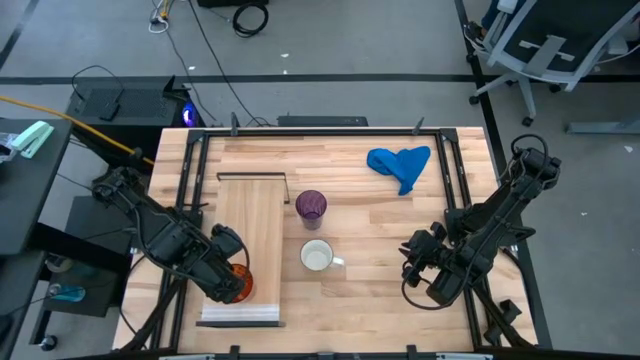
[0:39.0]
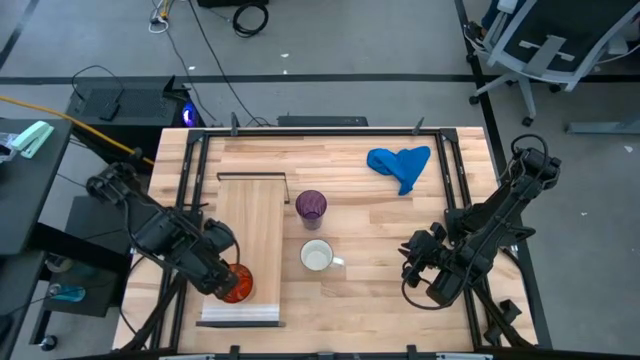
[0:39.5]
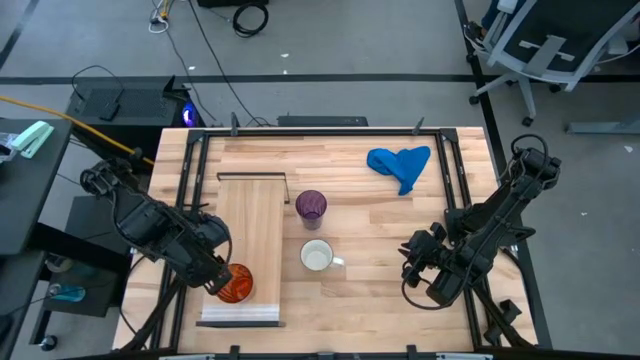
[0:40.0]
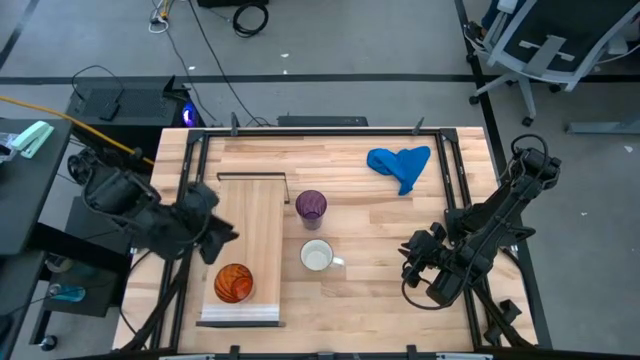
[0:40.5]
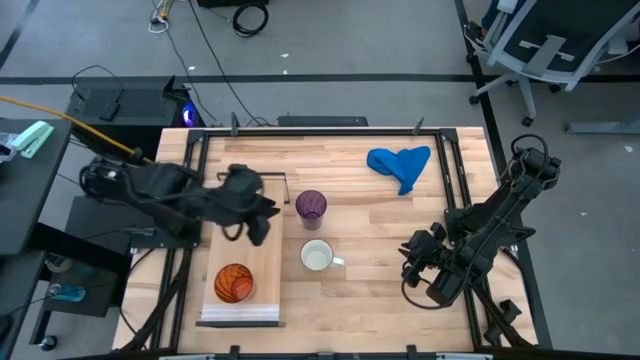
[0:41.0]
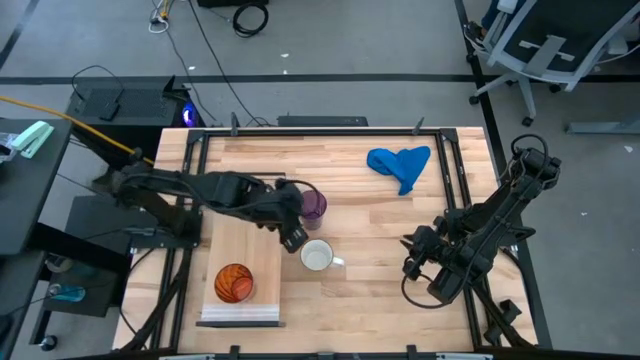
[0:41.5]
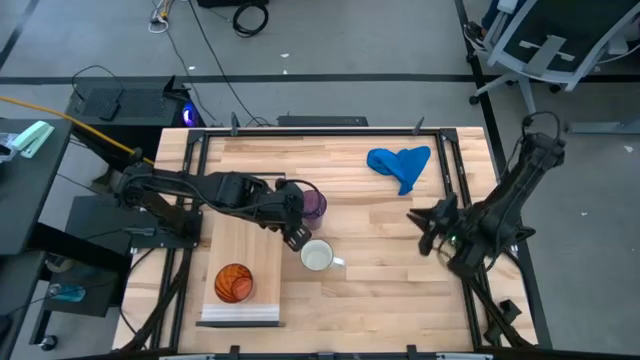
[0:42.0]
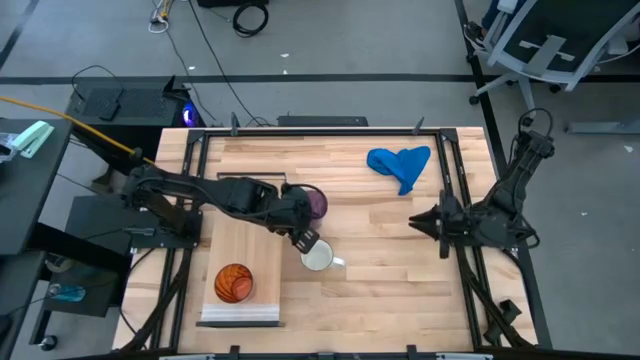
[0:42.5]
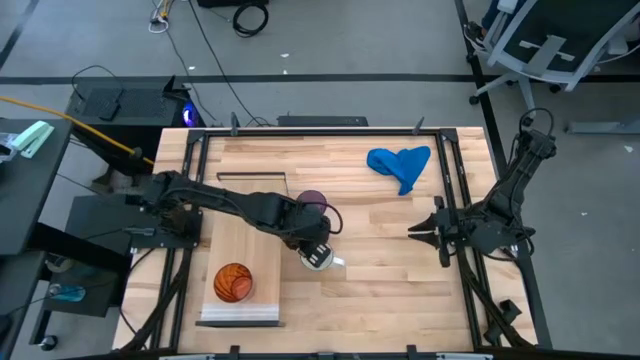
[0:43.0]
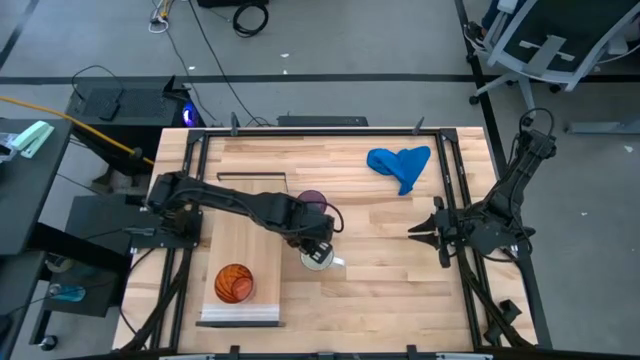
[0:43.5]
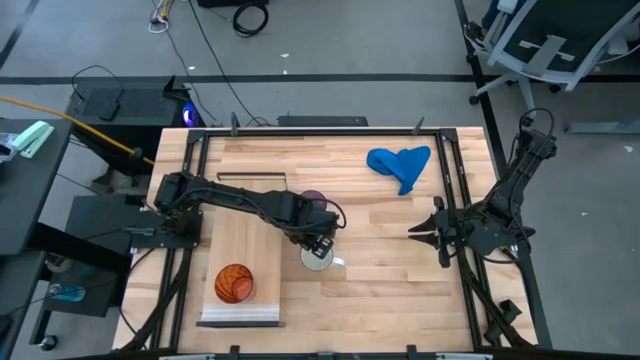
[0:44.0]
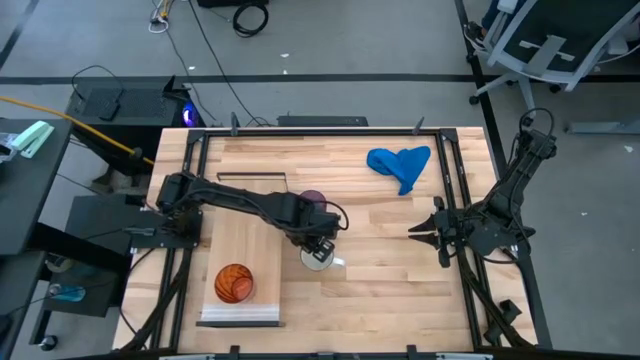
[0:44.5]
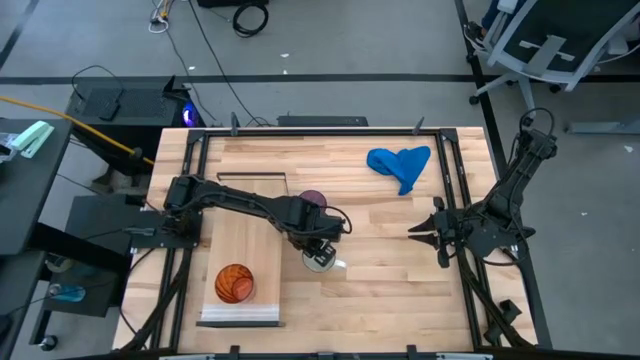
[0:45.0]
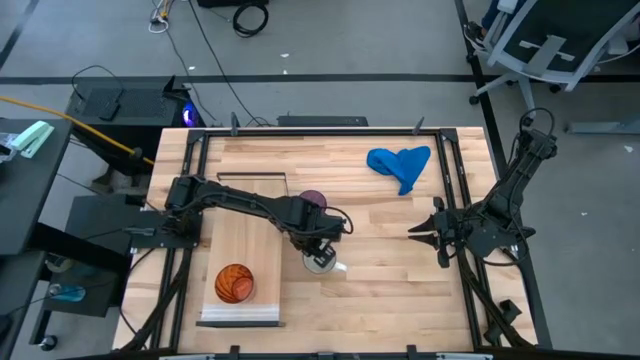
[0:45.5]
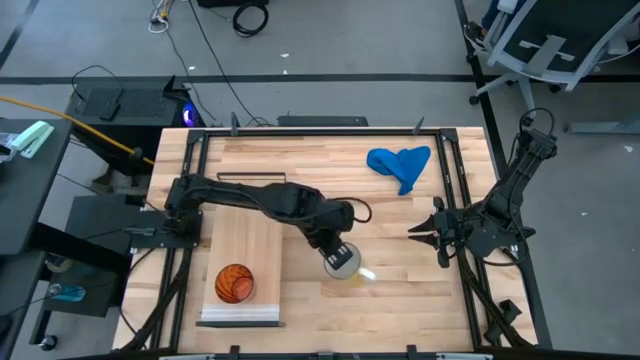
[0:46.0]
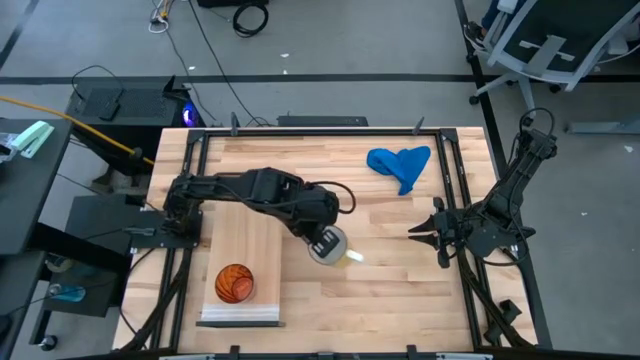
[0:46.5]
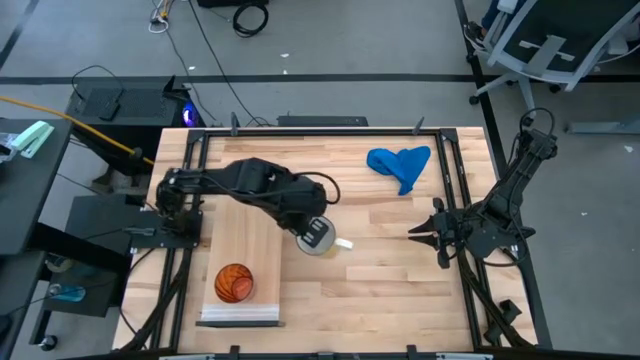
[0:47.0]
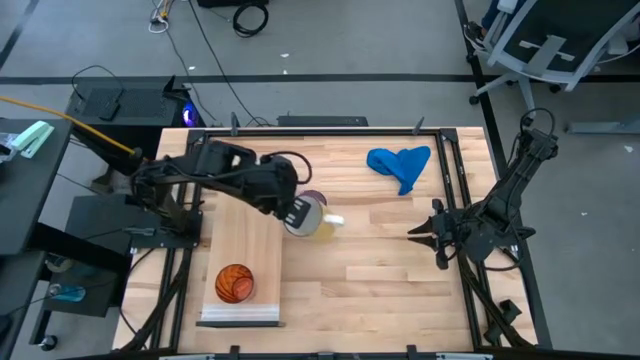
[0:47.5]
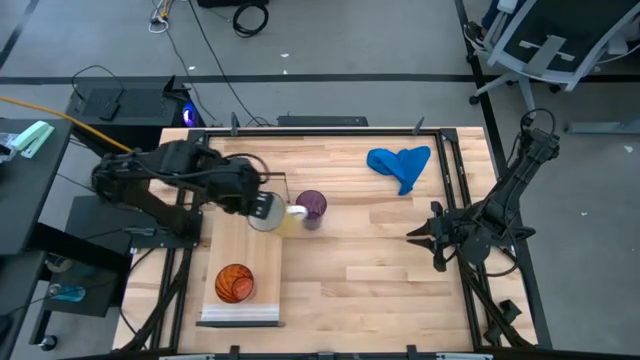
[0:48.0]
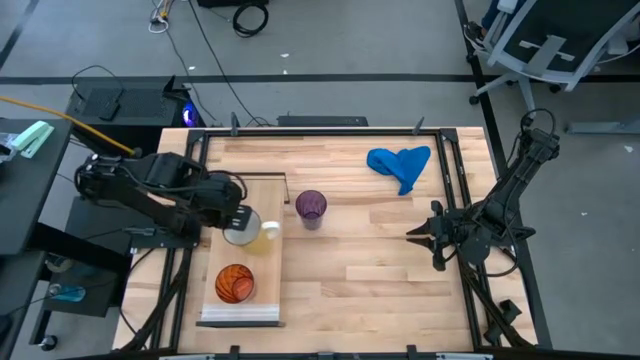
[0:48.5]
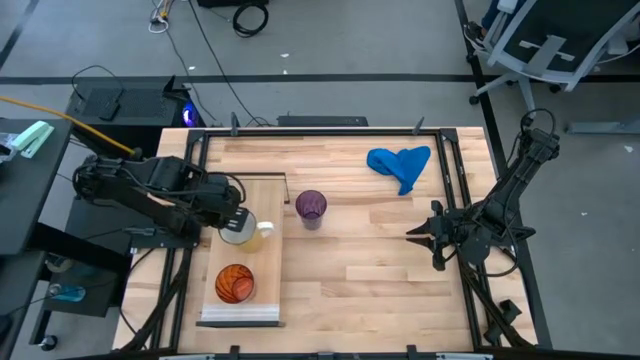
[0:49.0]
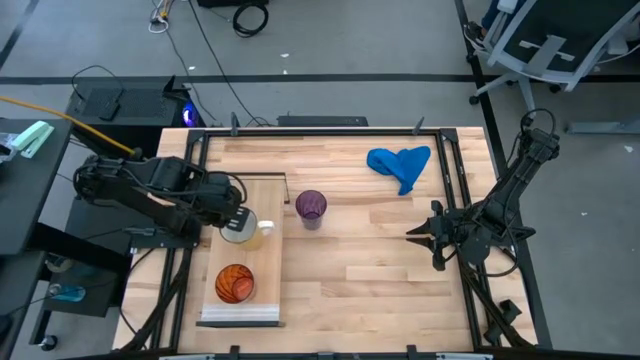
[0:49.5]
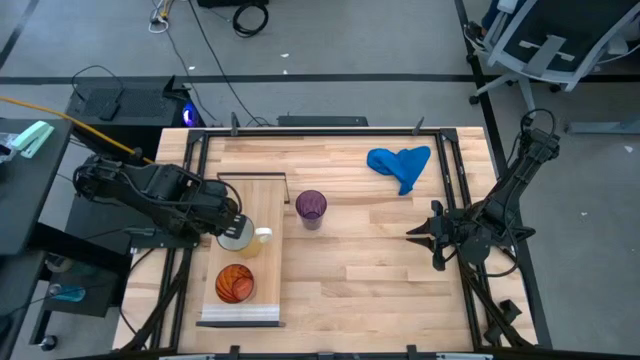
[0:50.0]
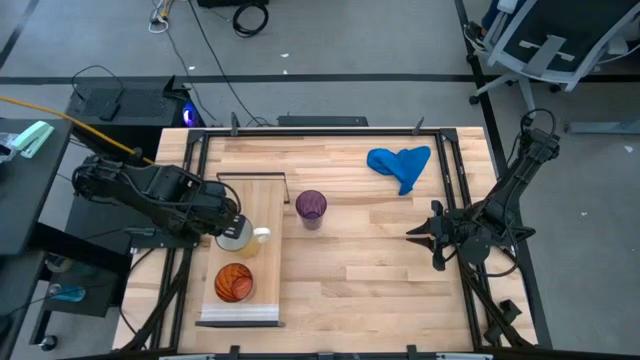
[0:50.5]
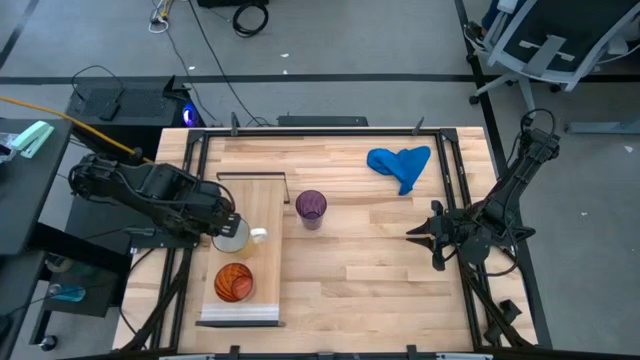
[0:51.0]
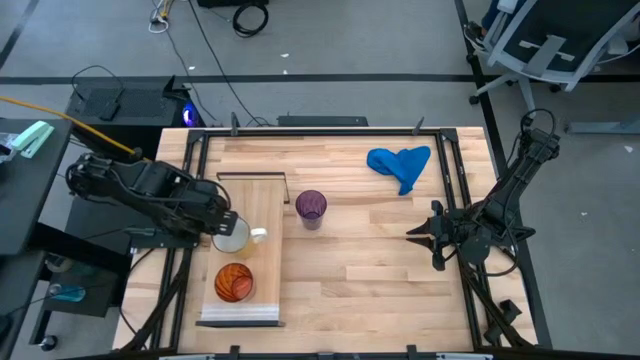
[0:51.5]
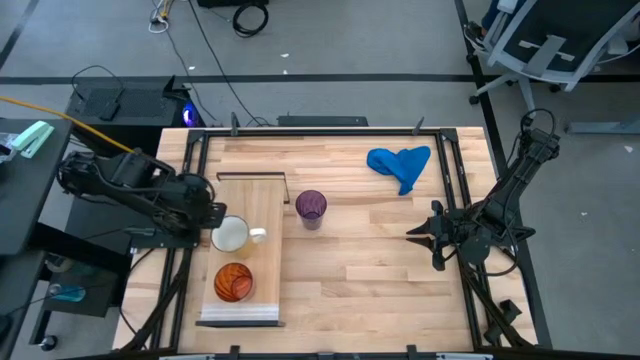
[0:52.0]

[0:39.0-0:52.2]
Task: Stack small to large cups/mugs on shelf
Put the yellow mug on the shelf

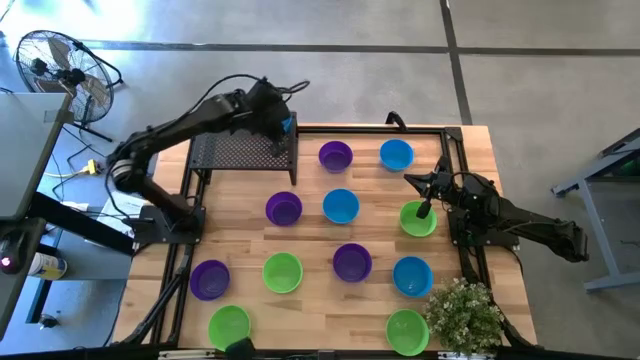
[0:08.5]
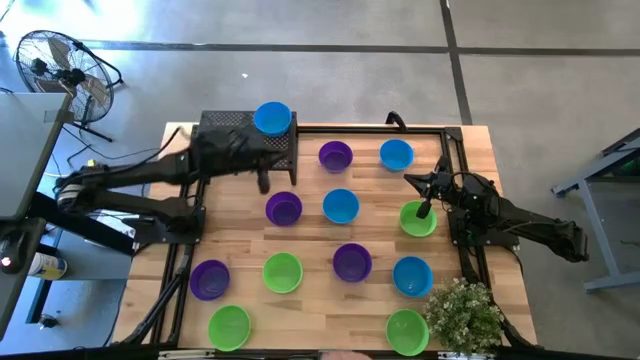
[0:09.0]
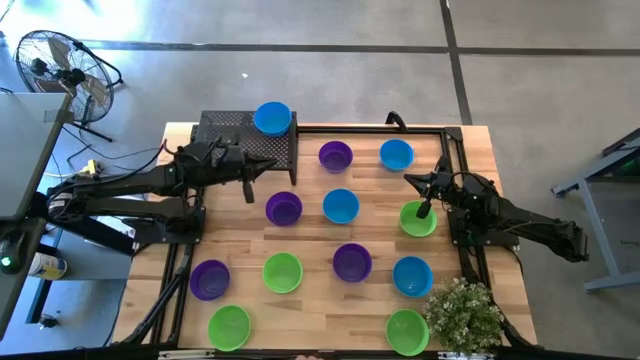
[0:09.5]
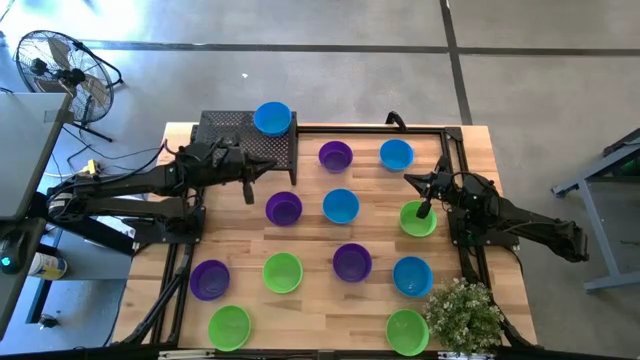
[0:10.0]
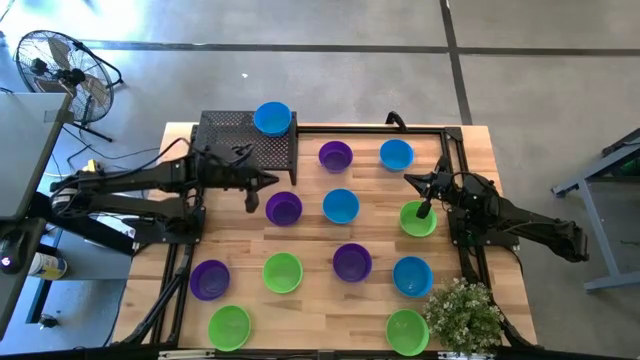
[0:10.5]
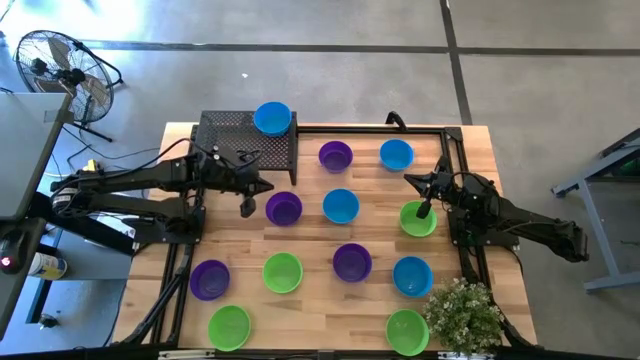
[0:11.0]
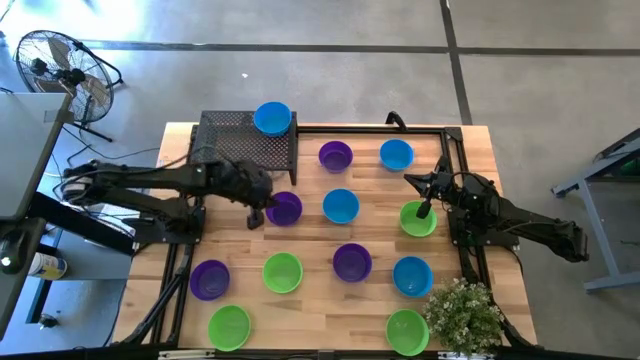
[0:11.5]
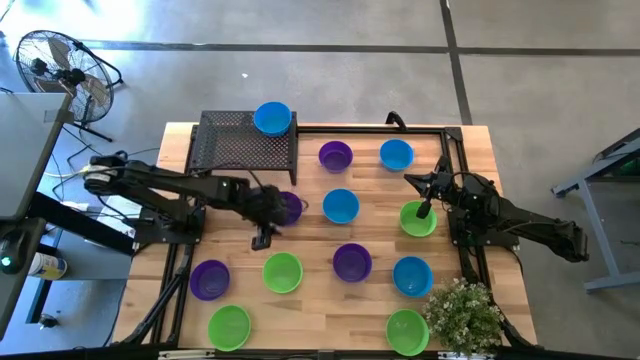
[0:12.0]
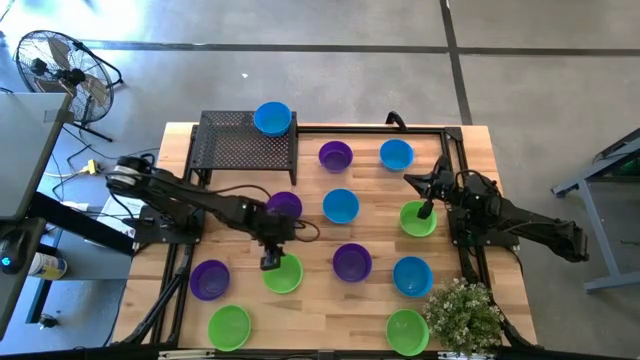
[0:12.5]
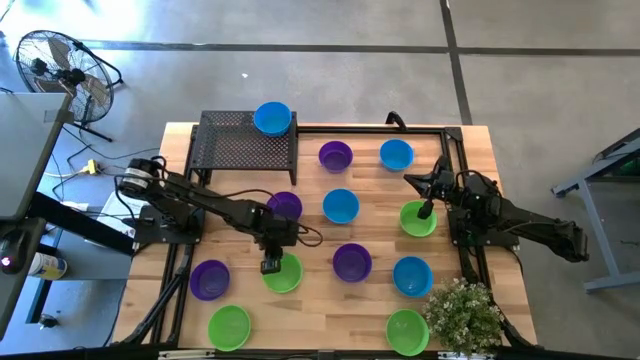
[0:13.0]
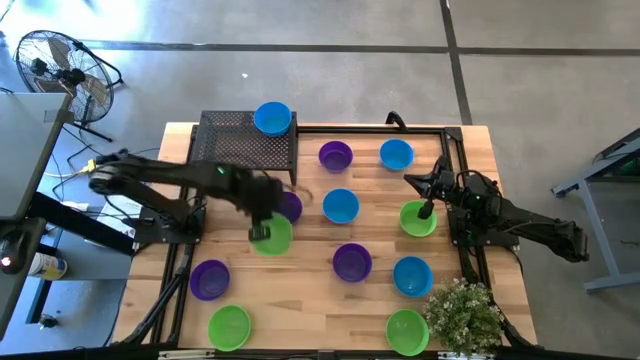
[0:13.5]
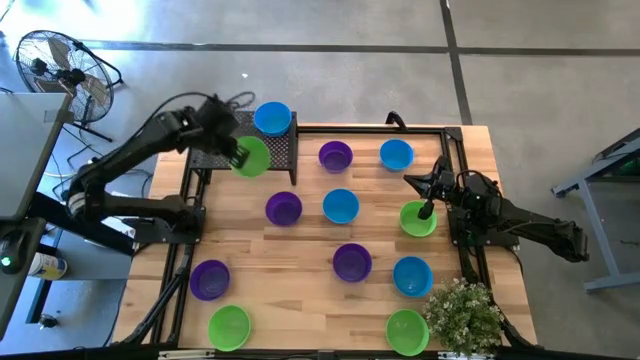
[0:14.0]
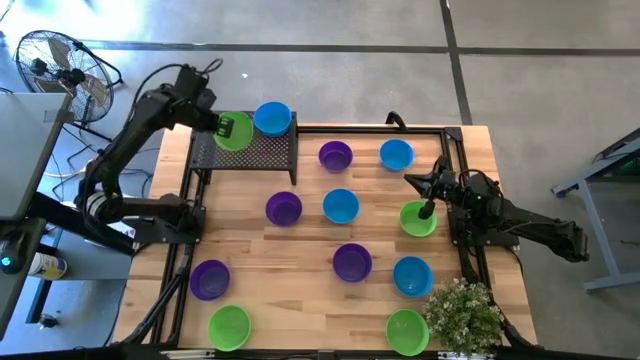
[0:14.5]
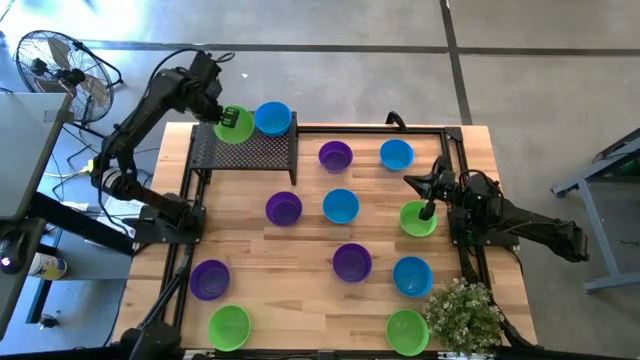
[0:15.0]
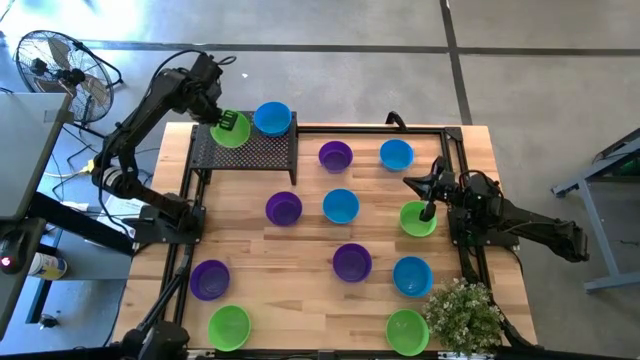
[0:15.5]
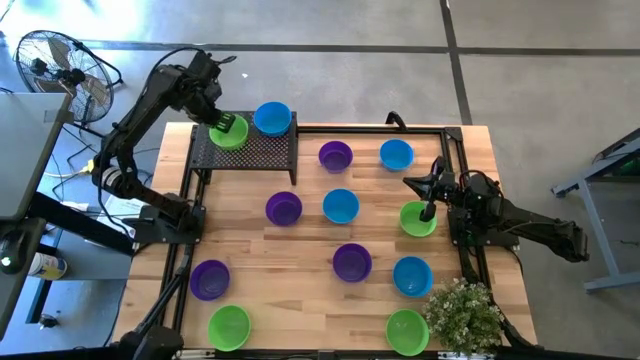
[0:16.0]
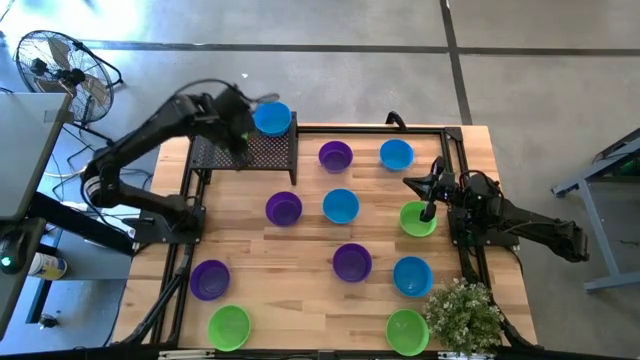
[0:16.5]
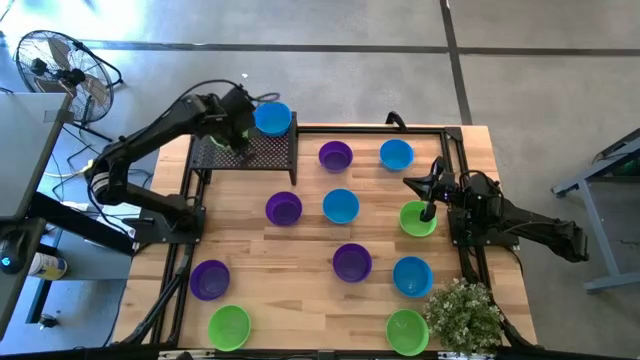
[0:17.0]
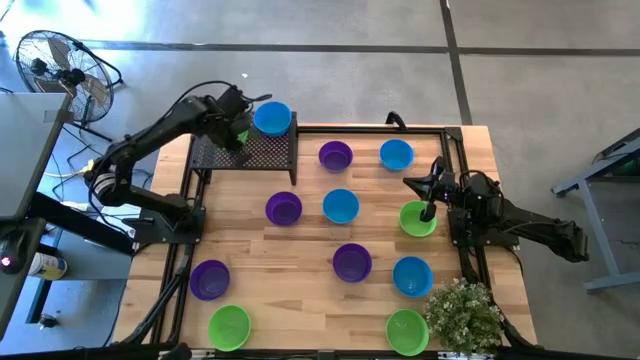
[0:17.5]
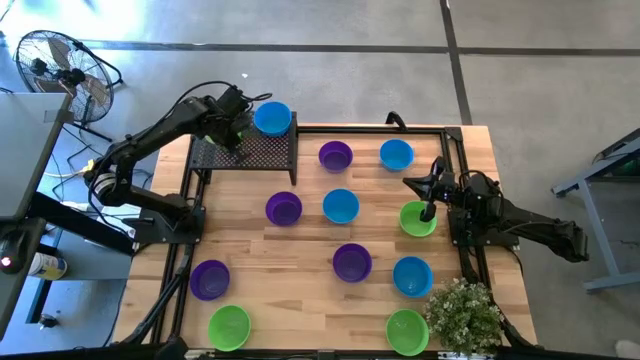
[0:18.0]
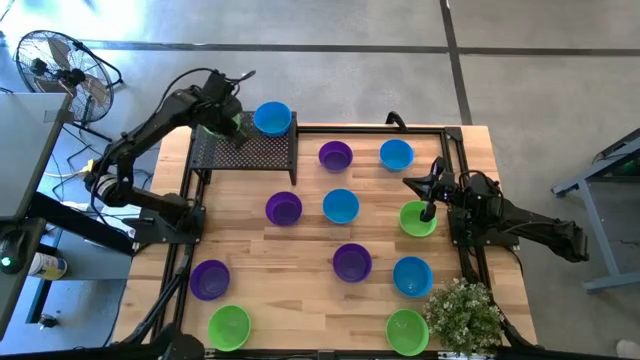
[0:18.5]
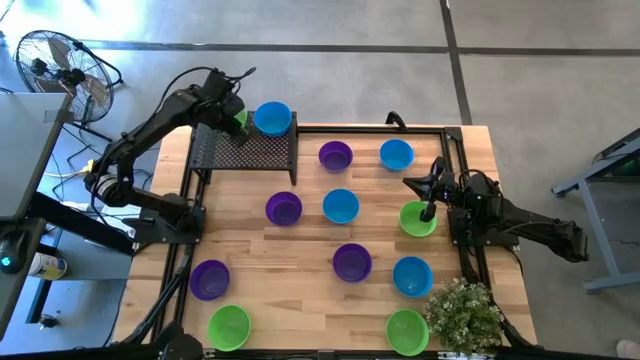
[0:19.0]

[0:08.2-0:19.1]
Task: Pick & Place Mini bowls
Put the green bowl on the shelf
